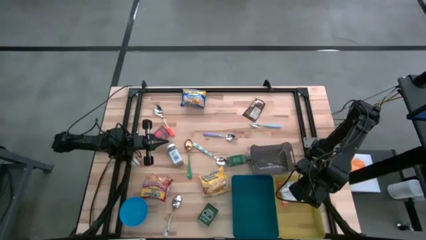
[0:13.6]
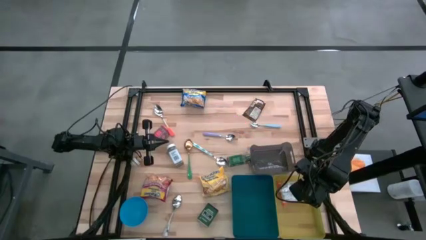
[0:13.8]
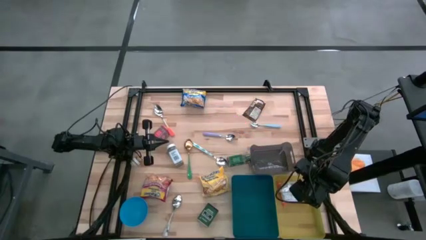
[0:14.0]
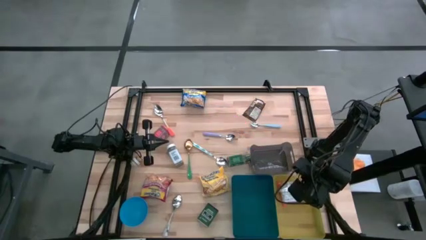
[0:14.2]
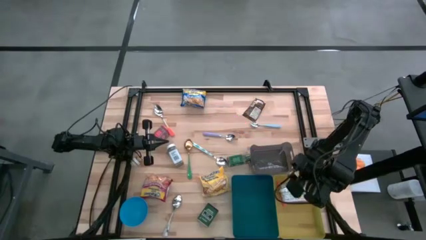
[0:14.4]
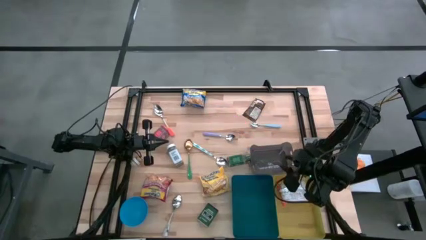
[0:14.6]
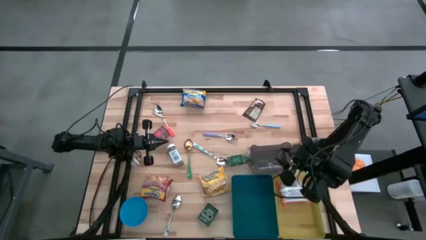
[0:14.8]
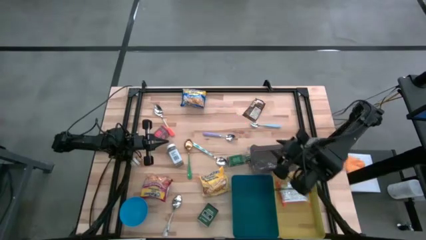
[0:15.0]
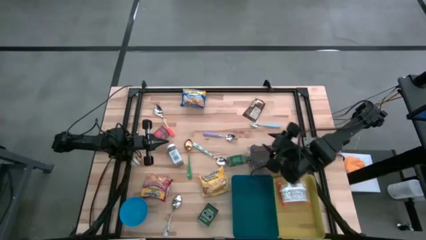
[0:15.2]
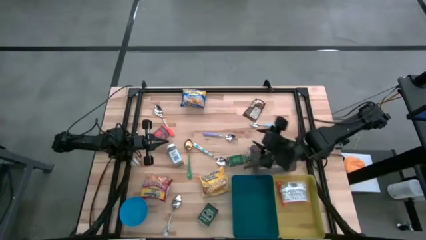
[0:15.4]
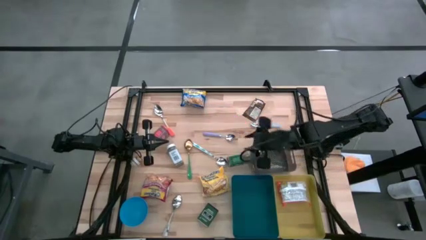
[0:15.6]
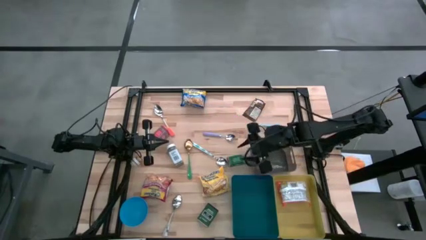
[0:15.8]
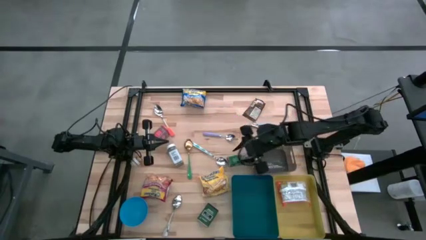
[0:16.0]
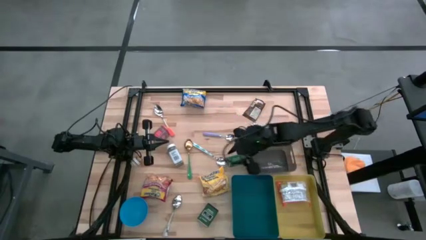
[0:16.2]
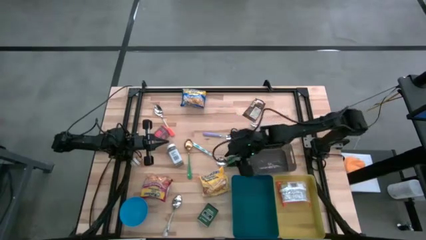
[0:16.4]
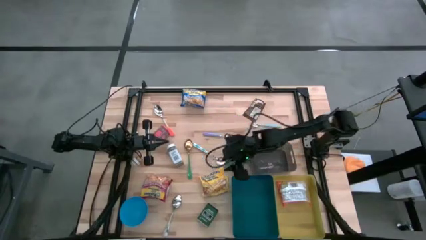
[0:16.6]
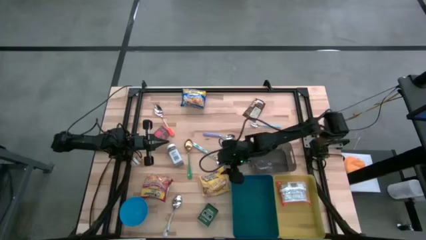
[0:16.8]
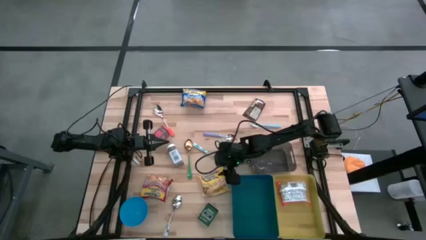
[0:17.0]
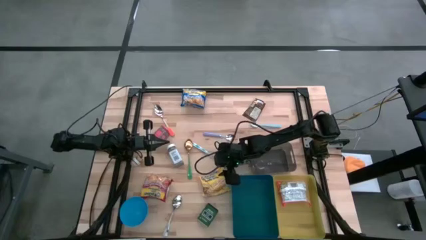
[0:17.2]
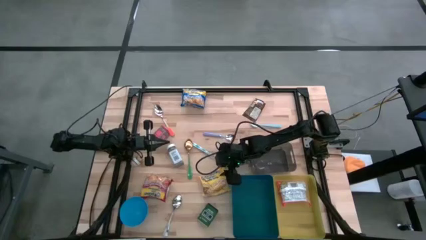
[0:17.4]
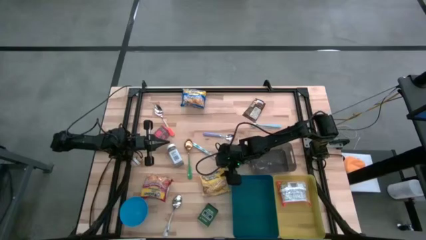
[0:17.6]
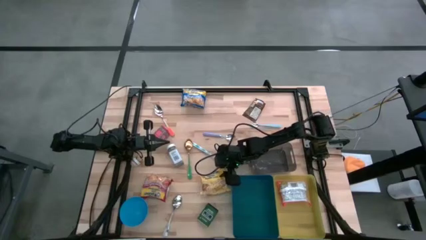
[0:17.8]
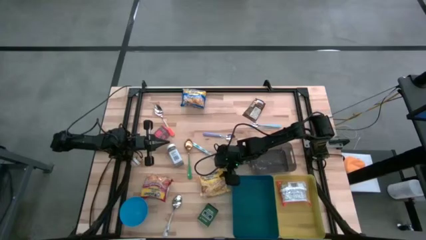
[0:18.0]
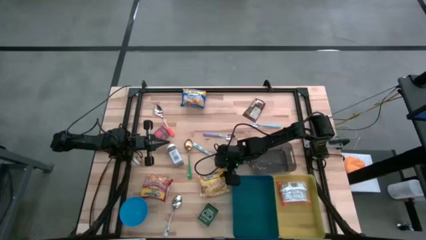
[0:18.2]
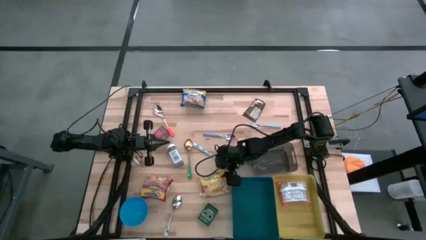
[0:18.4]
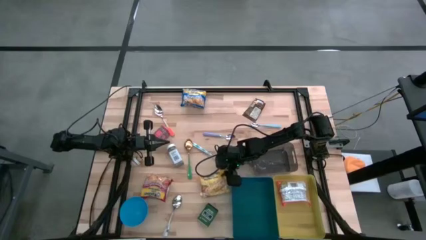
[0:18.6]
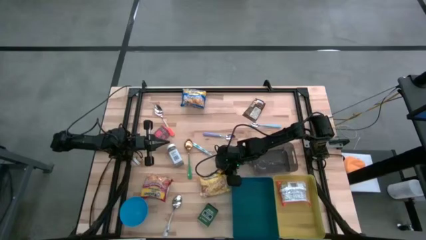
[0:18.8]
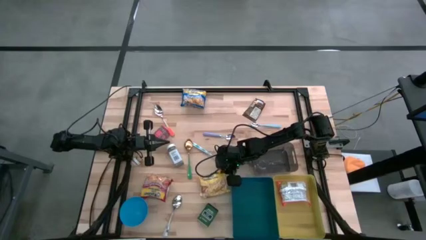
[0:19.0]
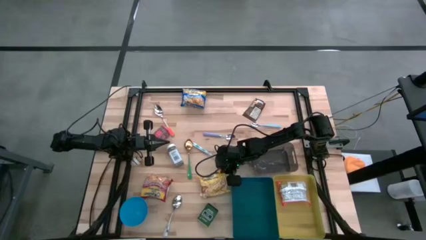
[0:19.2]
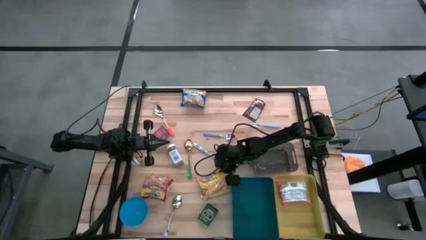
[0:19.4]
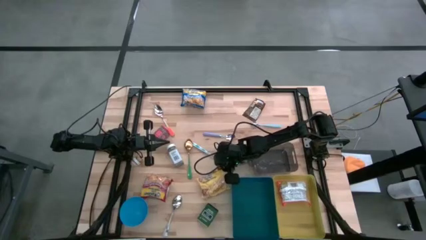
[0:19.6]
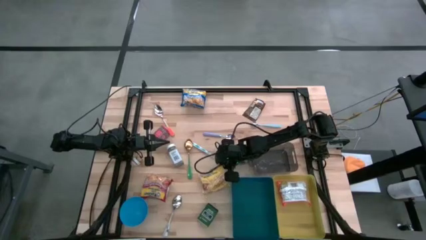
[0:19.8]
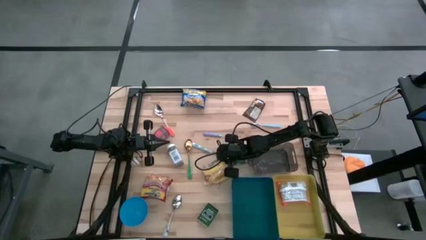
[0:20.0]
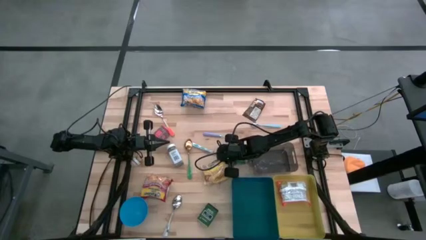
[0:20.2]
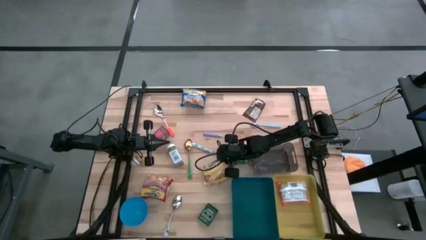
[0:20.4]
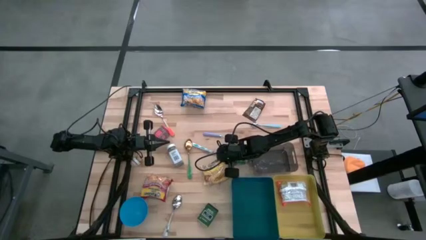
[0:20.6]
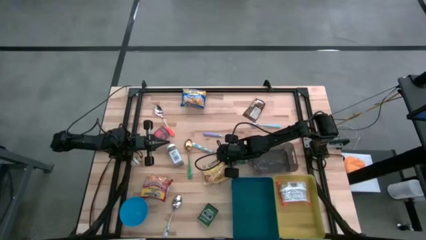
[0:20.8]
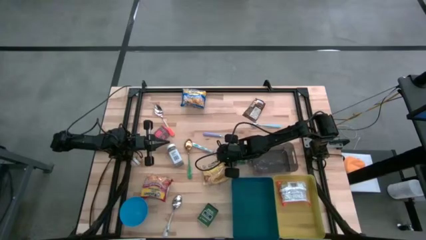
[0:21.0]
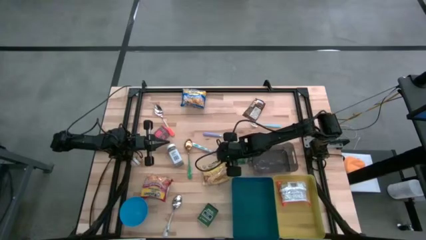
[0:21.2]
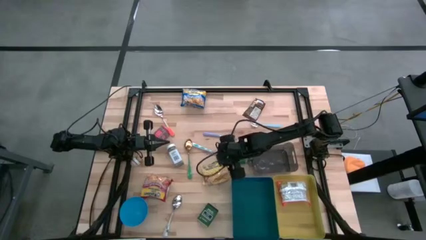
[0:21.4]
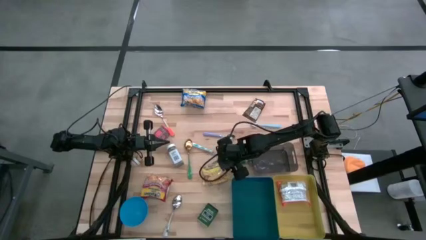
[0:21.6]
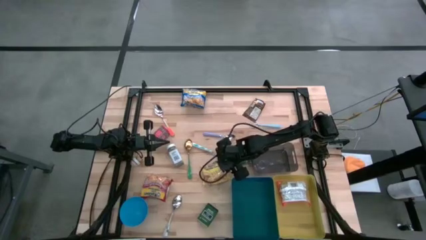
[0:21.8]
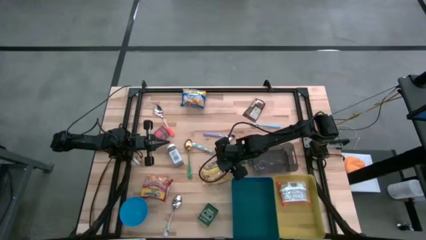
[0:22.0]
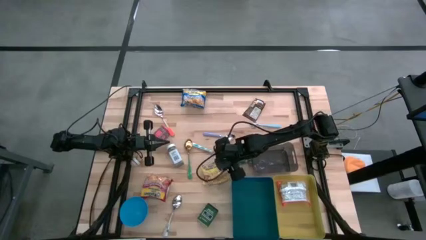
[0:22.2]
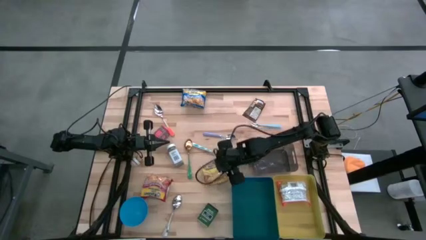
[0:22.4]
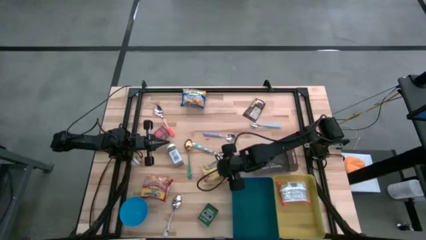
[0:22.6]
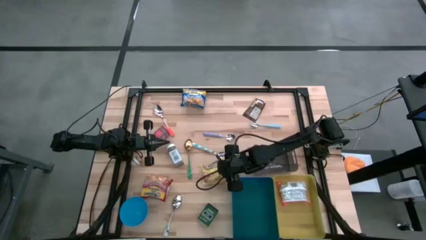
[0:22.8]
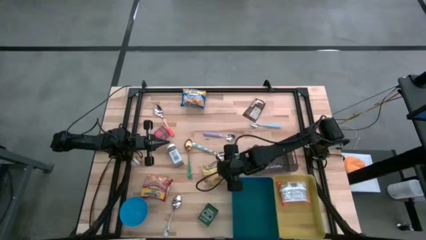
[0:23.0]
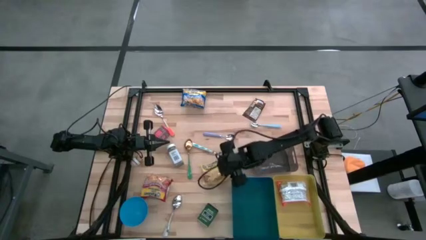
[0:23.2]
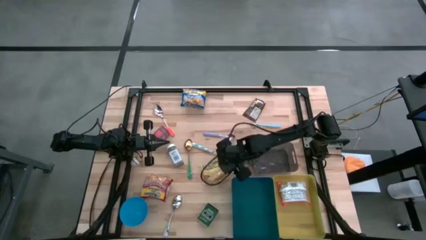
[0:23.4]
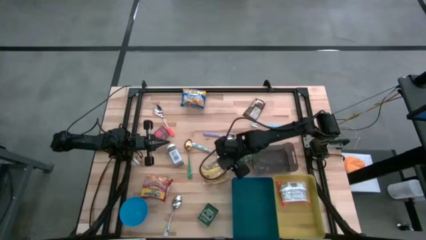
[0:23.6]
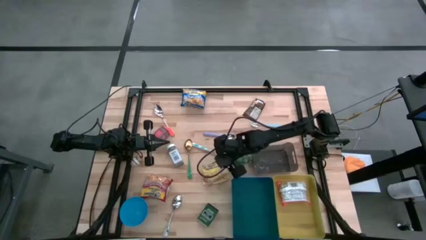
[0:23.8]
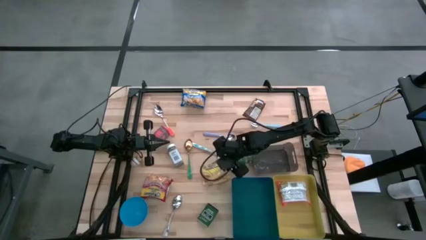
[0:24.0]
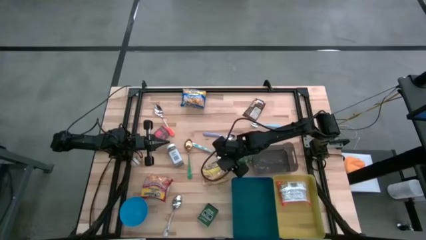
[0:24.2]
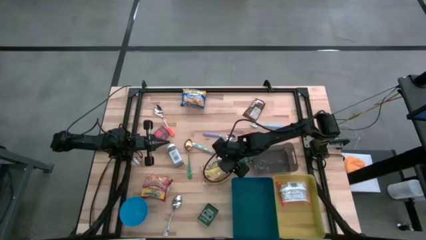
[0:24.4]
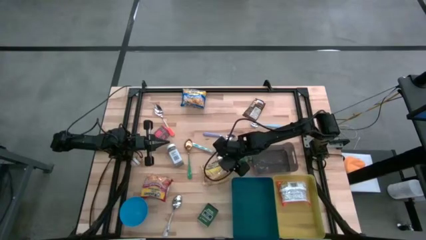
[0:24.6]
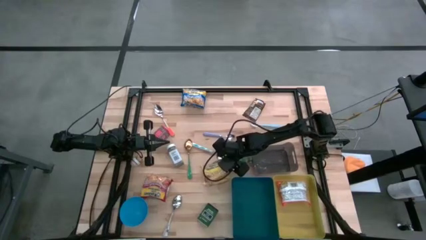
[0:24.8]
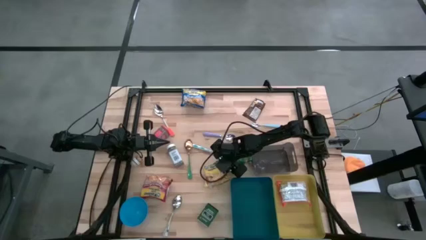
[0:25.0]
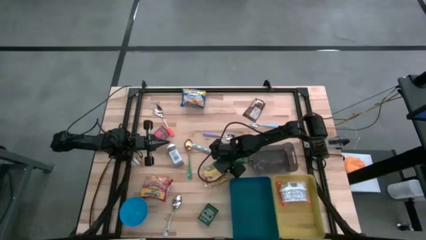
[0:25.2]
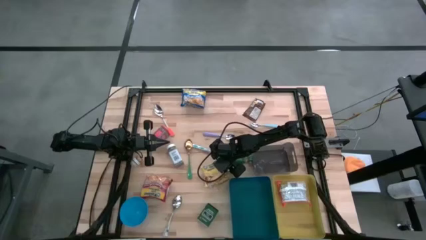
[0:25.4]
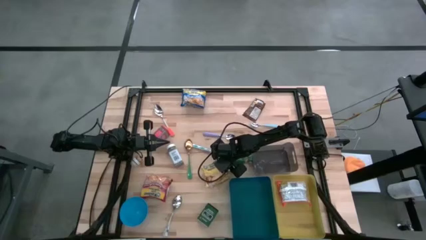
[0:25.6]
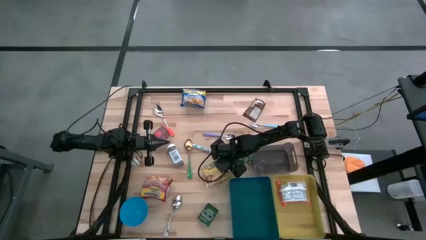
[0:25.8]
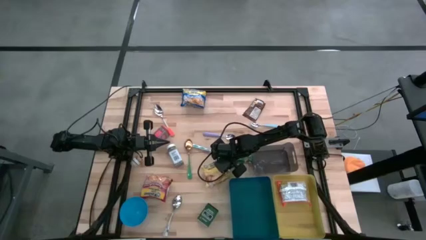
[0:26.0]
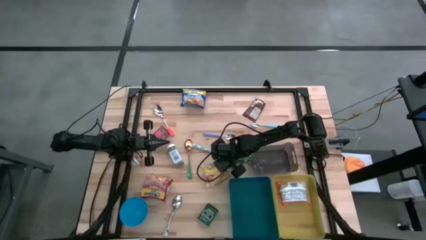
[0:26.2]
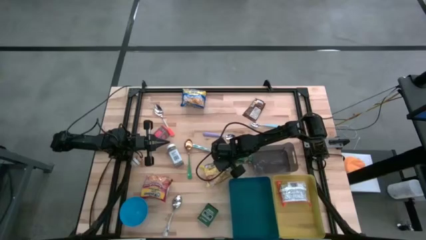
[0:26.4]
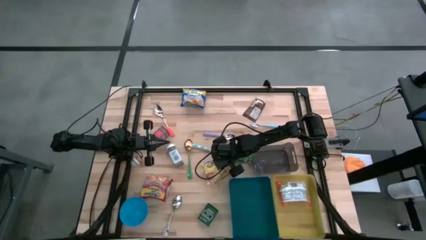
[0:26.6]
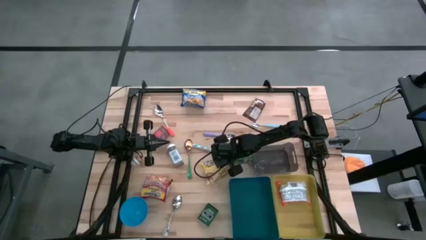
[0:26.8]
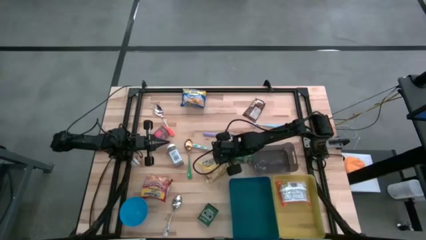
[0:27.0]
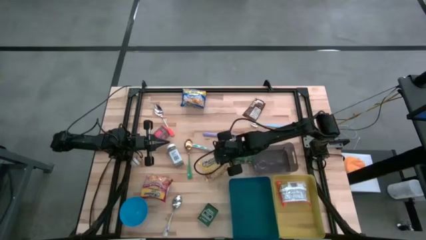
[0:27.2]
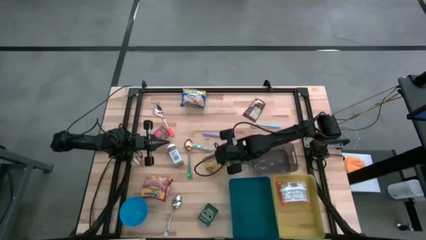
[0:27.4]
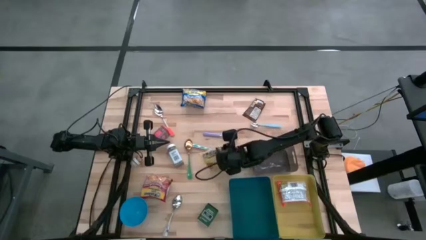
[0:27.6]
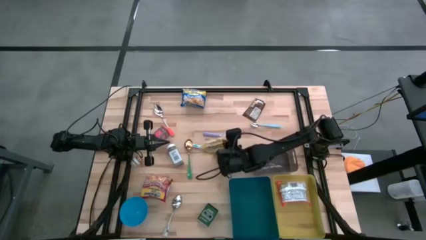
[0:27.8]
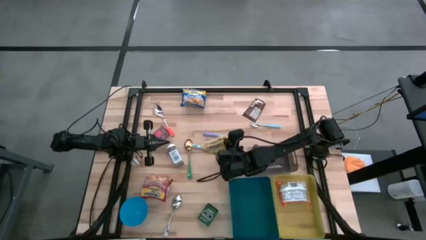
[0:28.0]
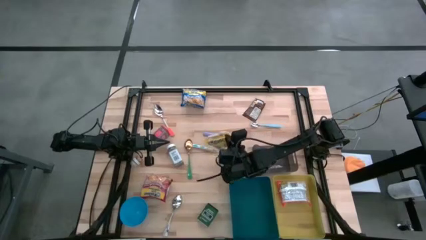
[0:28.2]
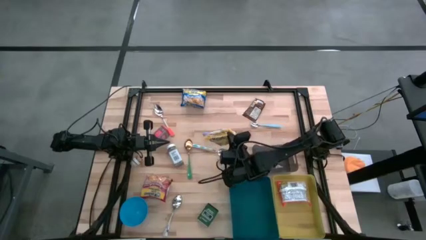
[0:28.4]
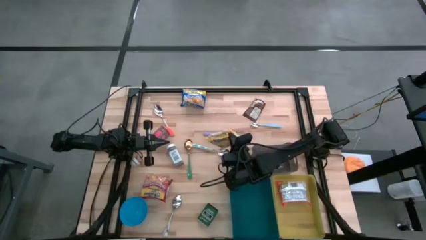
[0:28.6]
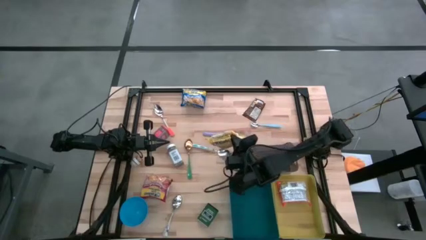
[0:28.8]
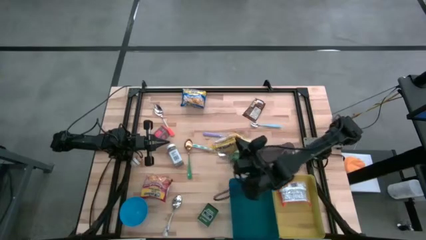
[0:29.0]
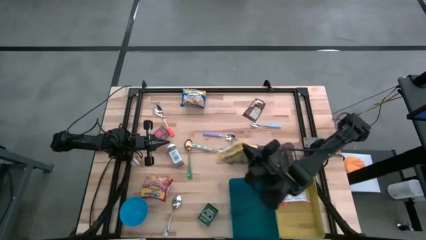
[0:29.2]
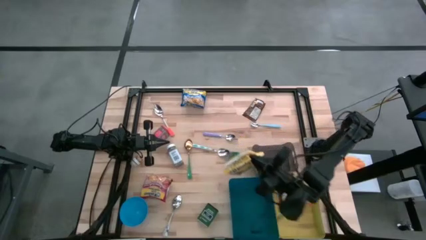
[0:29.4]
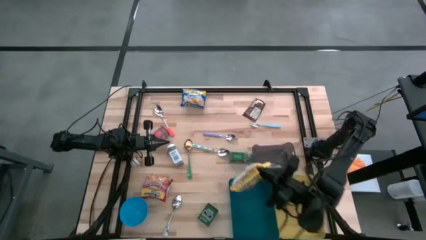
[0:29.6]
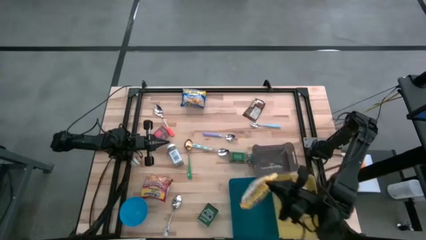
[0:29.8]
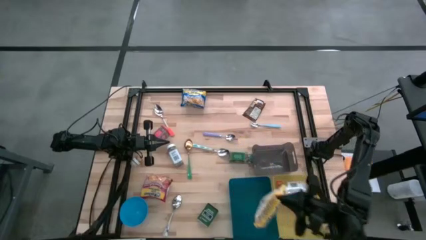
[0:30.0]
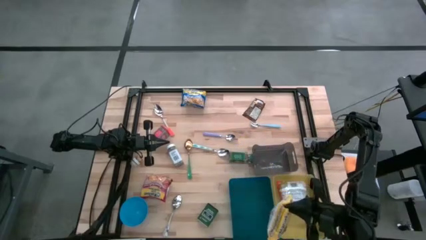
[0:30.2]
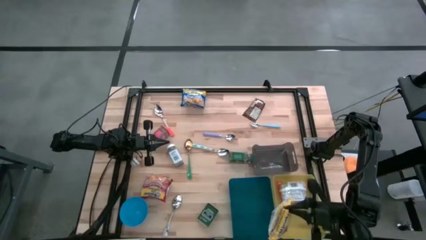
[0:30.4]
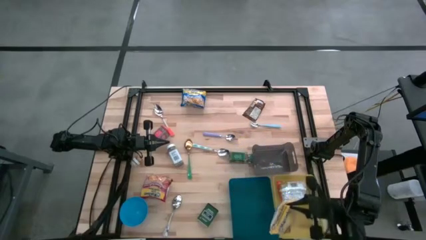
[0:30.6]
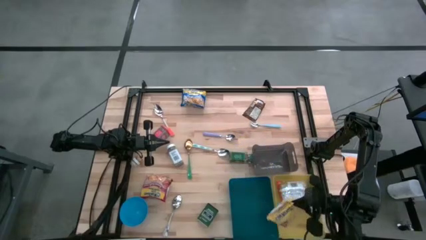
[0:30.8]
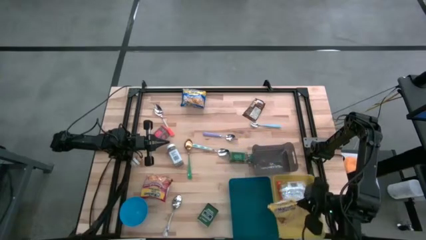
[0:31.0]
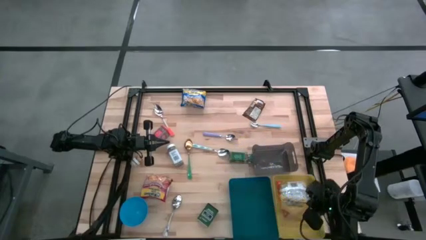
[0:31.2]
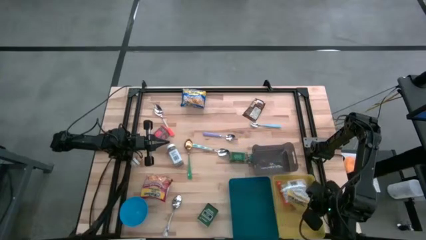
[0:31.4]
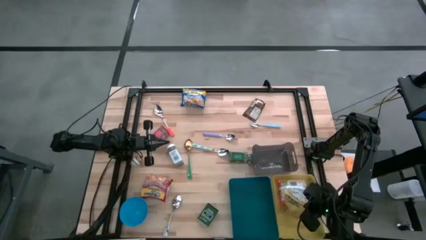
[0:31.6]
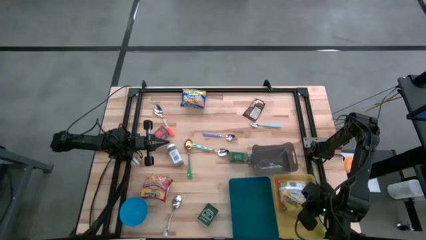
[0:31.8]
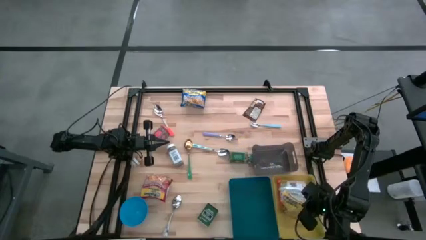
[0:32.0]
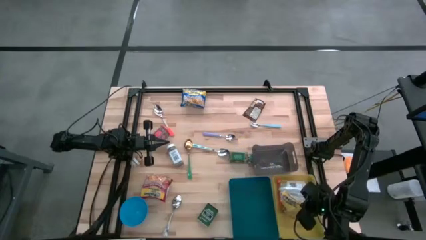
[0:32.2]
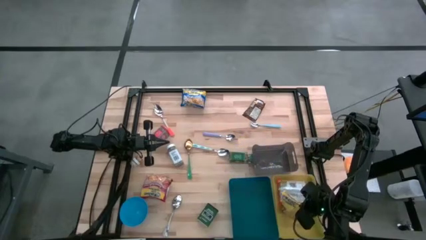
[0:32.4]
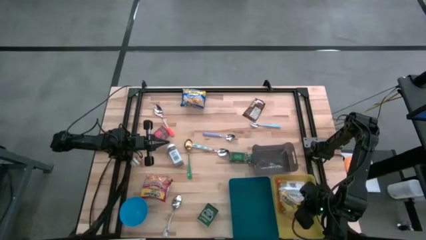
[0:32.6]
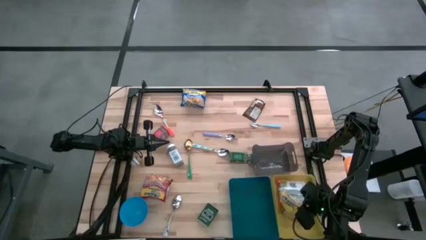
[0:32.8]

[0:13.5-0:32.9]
Put the yellow noodle pack into the yellow bin
